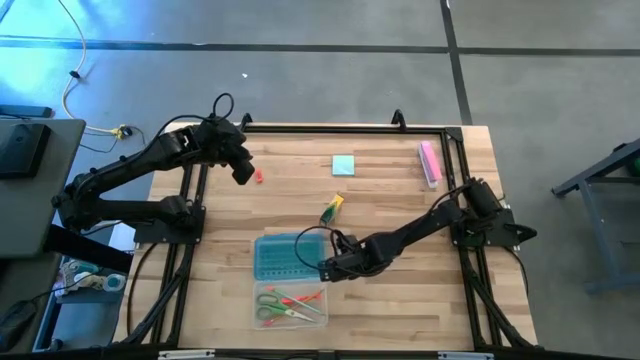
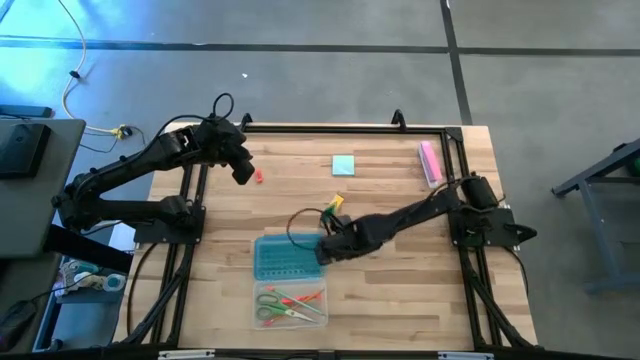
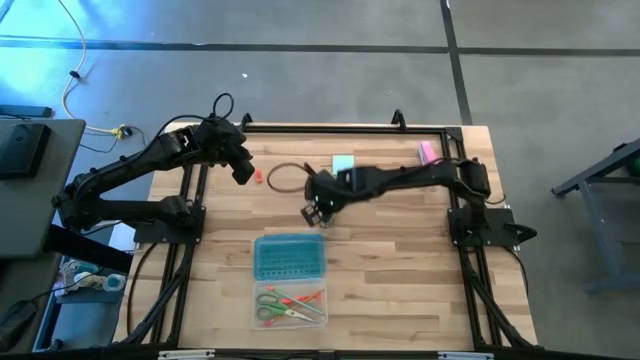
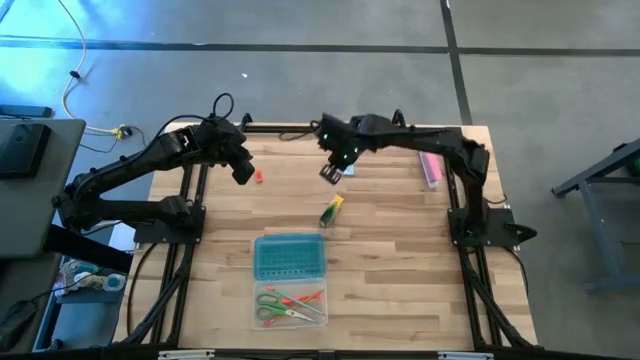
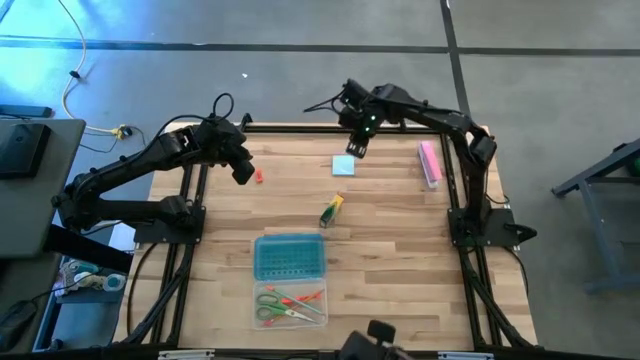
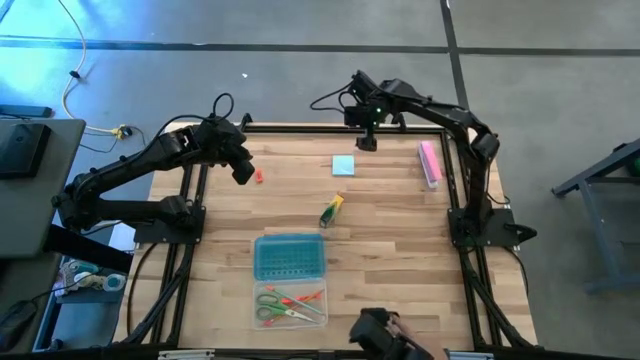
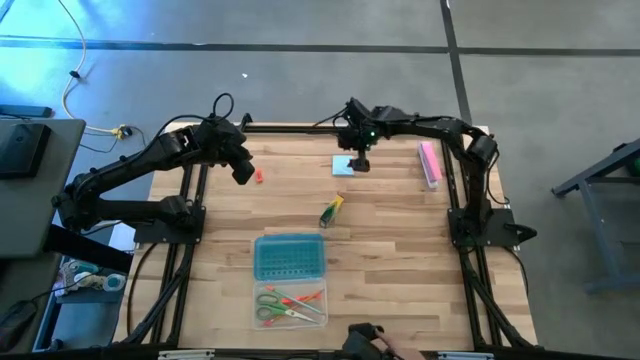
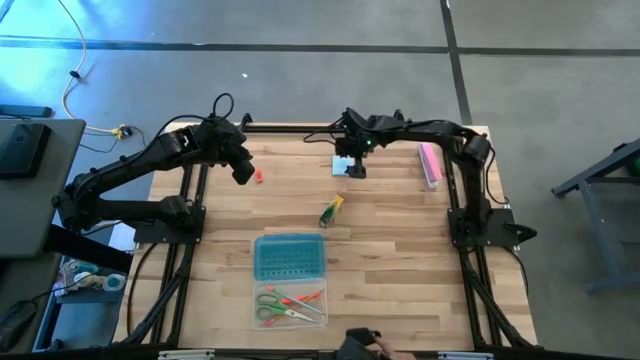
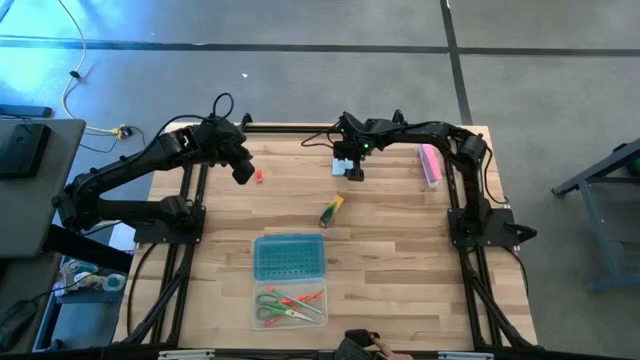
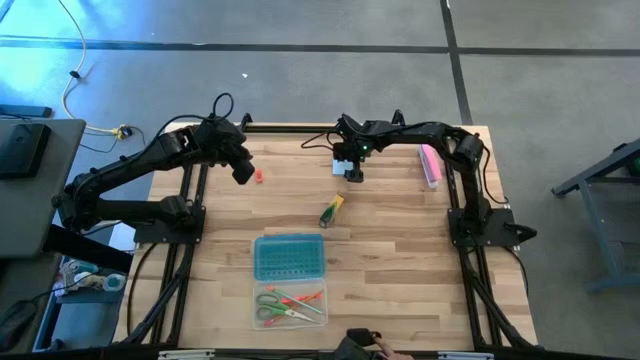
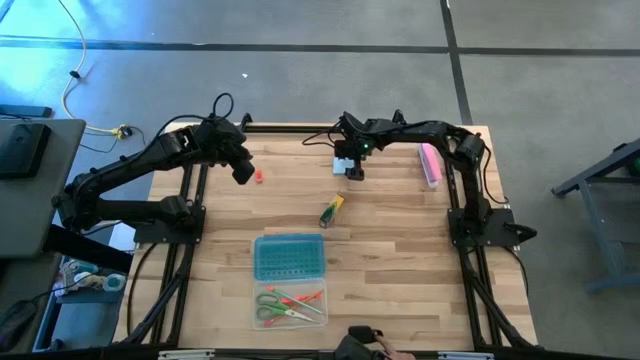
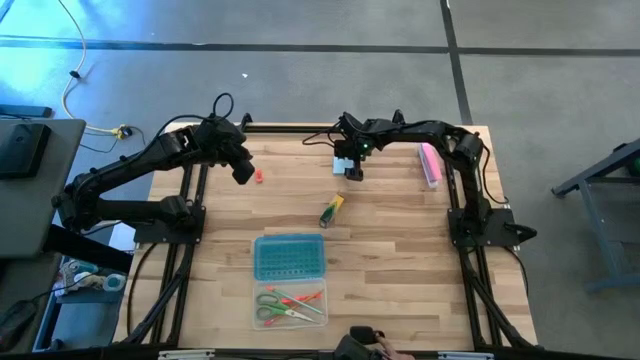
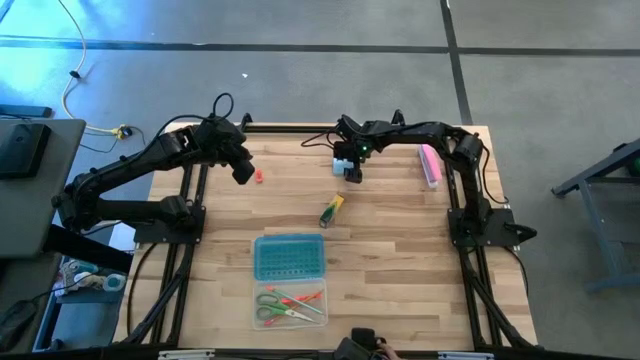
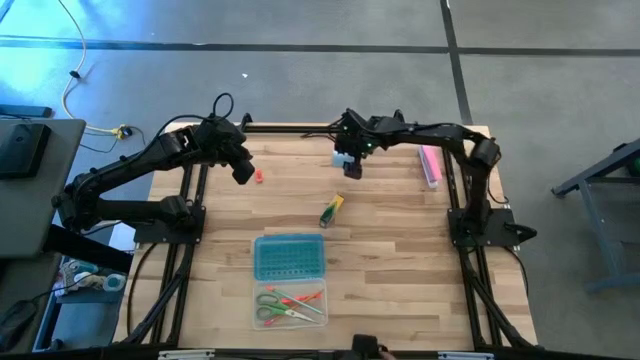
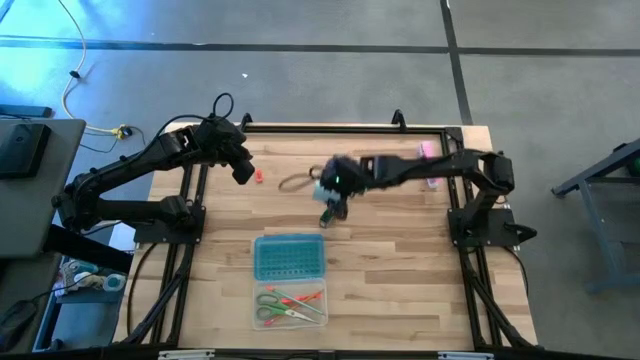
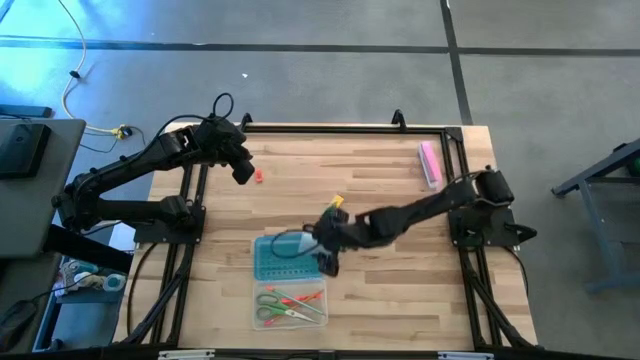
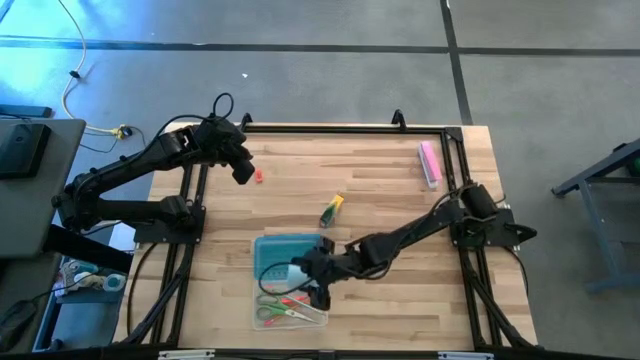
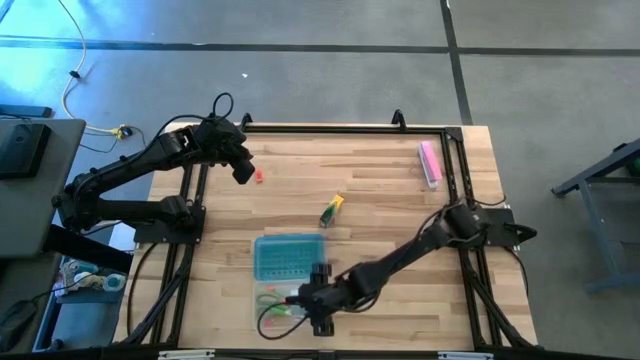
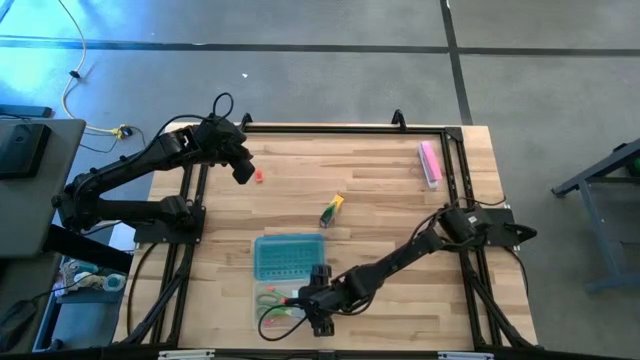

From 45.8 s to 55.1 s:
Task: Pack school essentials
Put the blue sticky notes into the supply box

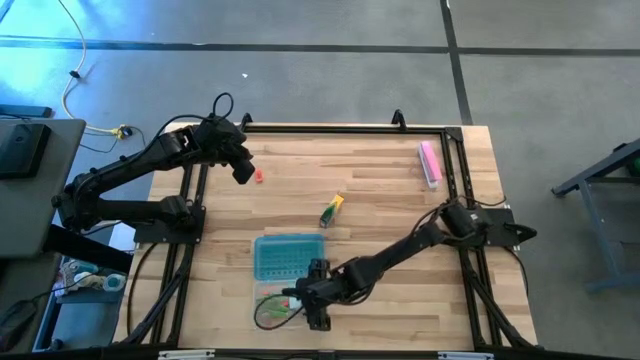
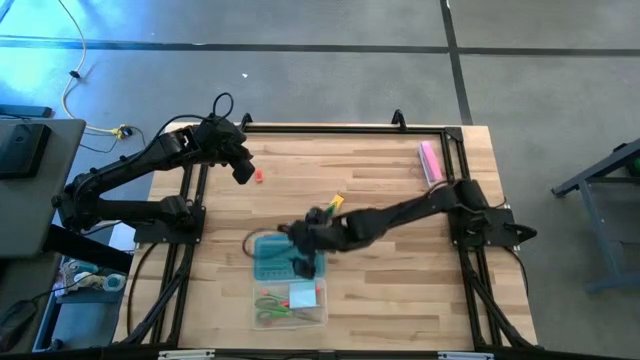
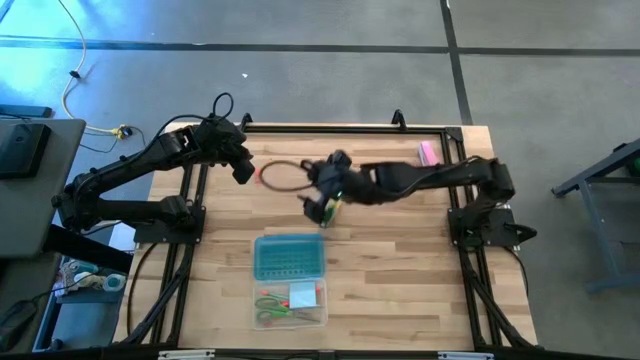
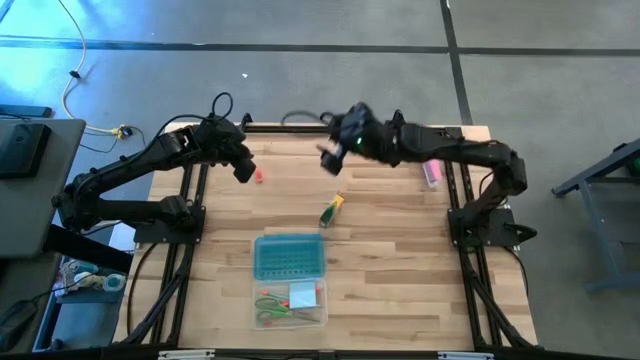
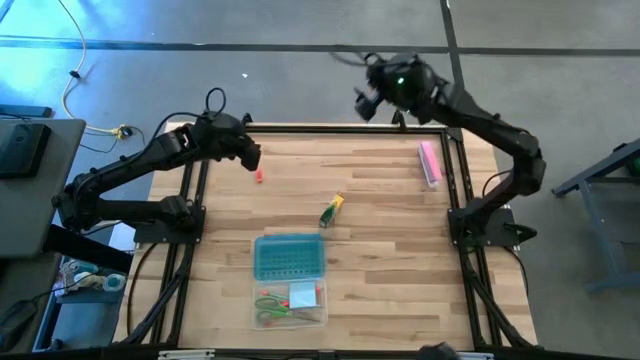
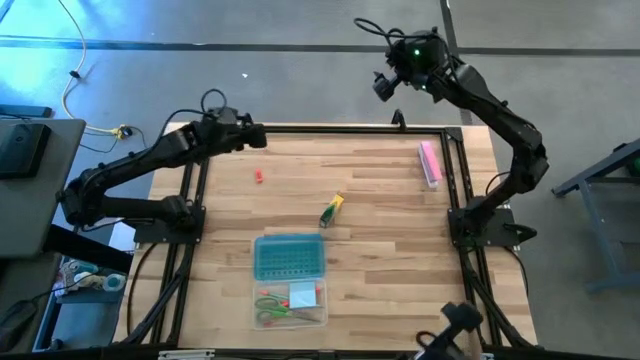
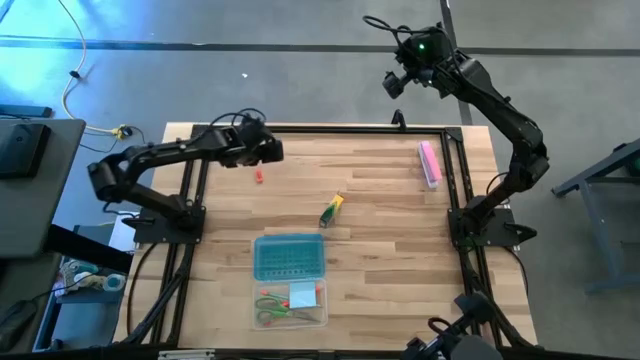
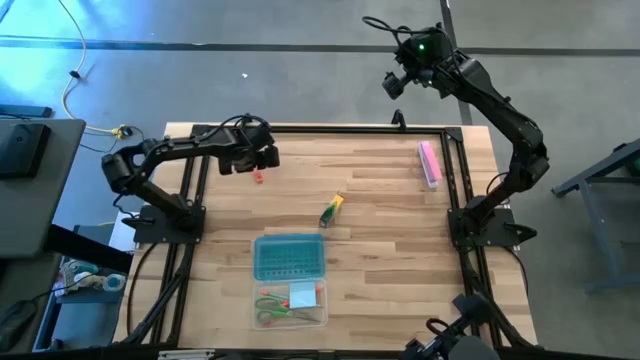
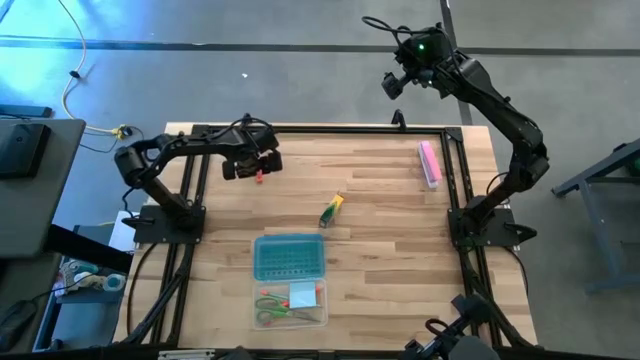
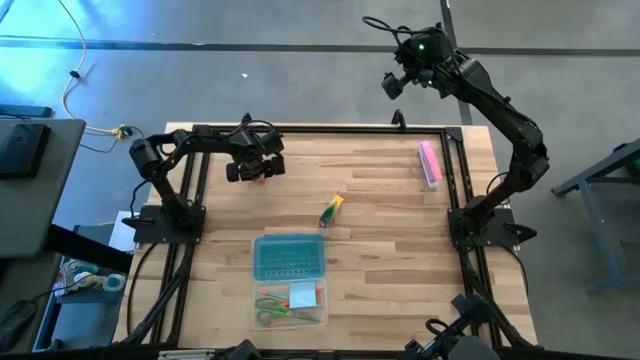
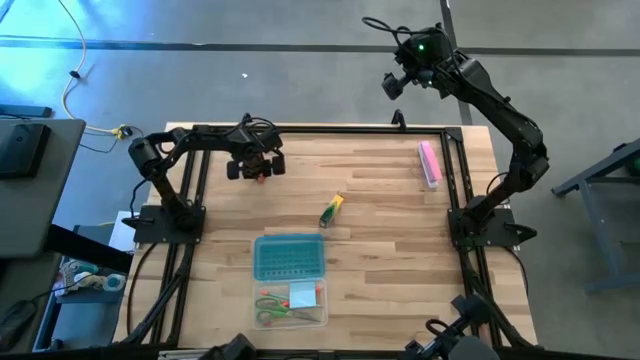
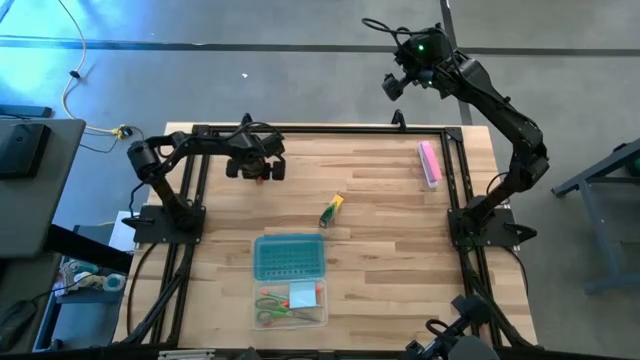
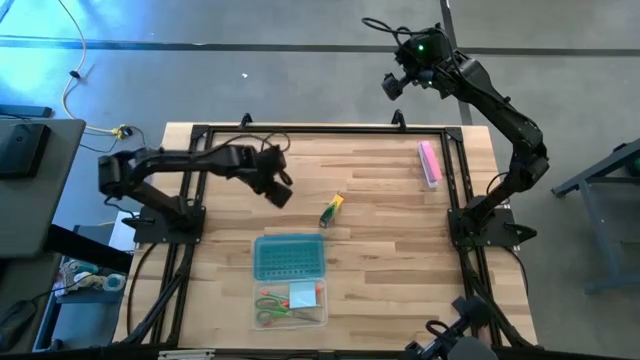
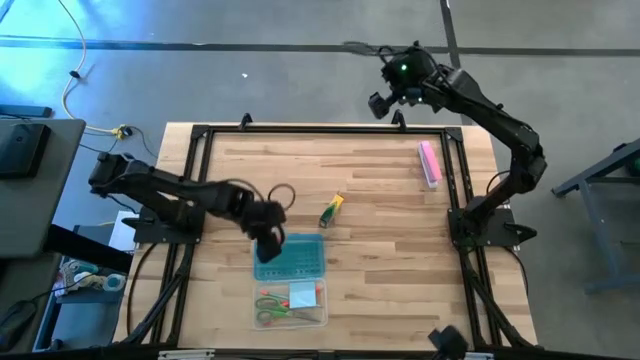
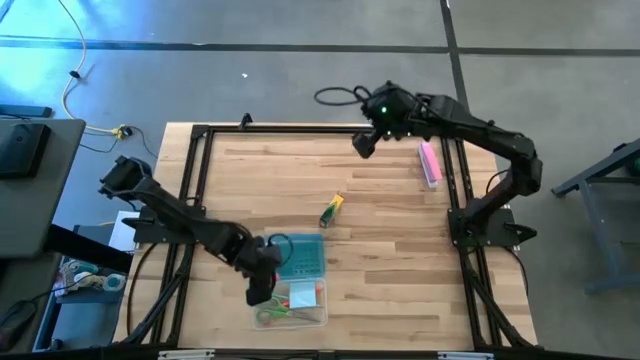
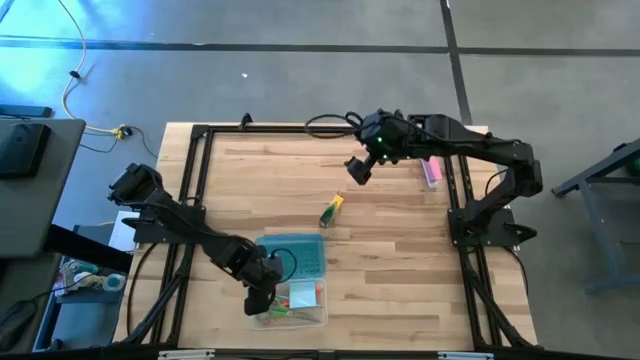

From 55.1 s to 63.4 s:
Put the orange eraser into the supply box

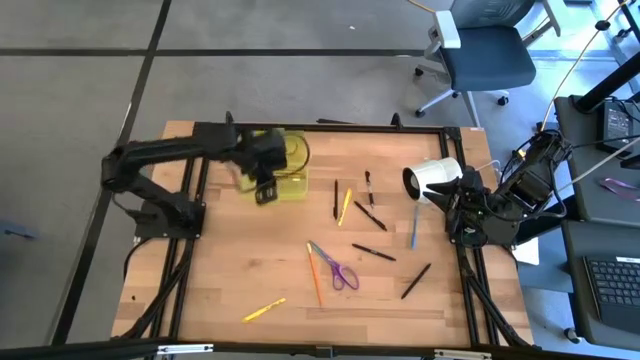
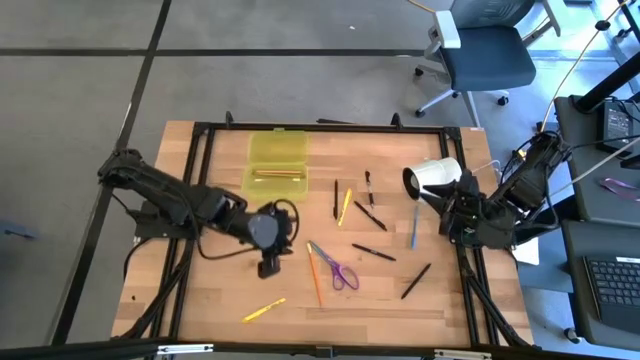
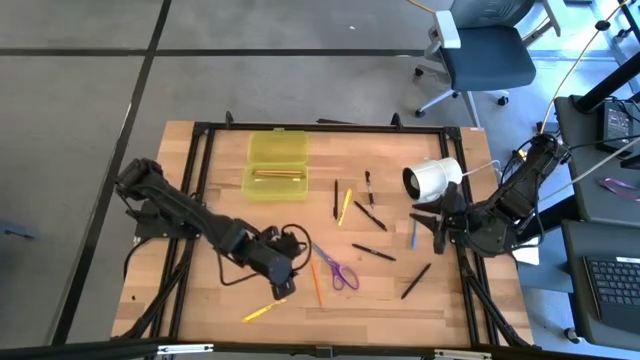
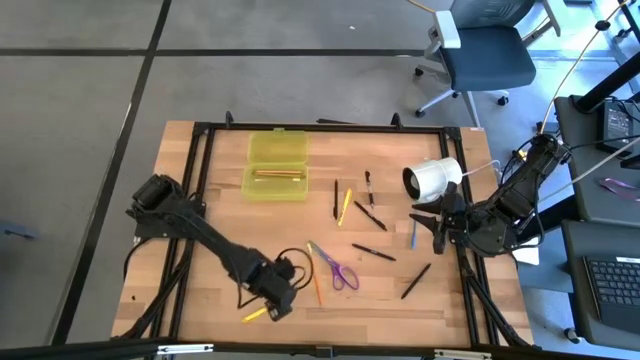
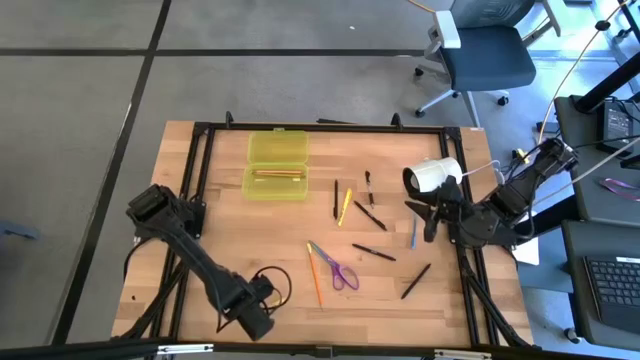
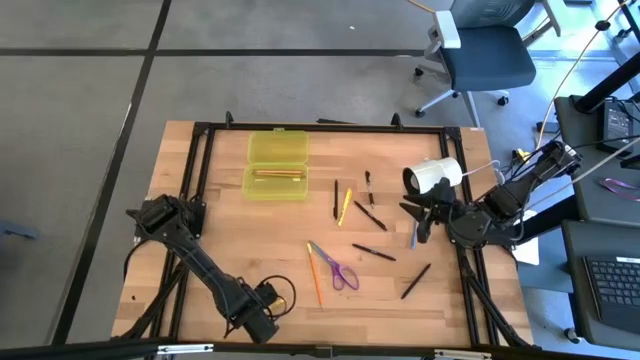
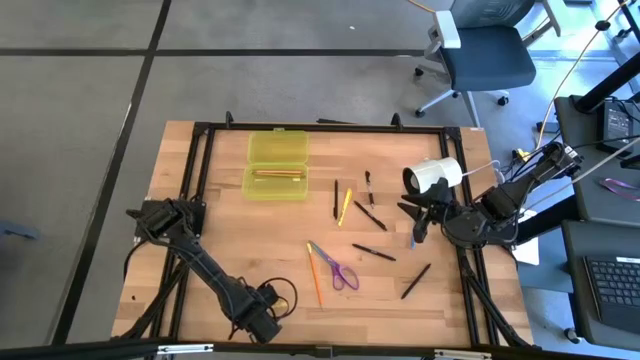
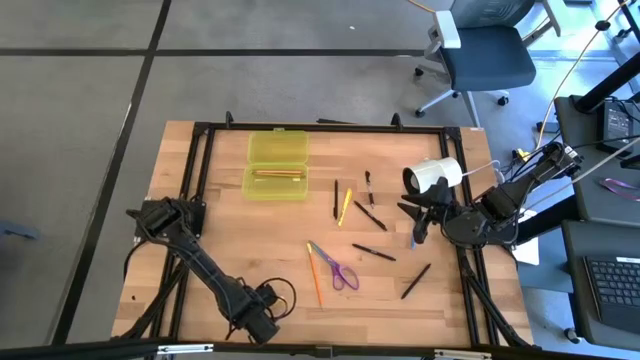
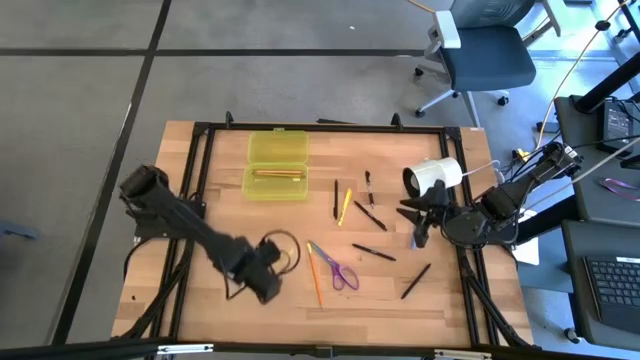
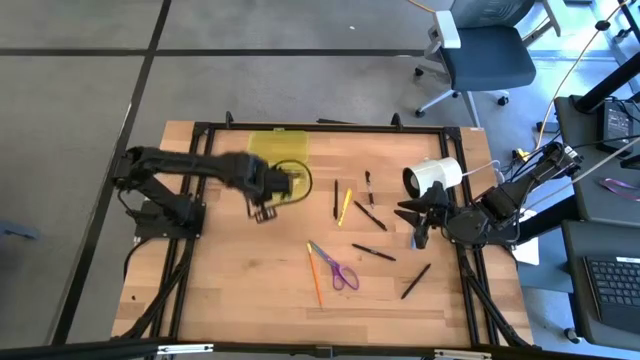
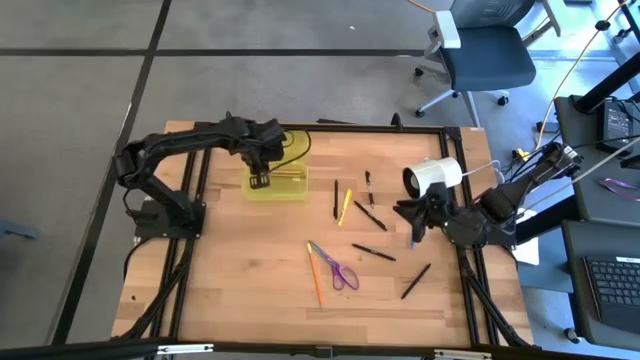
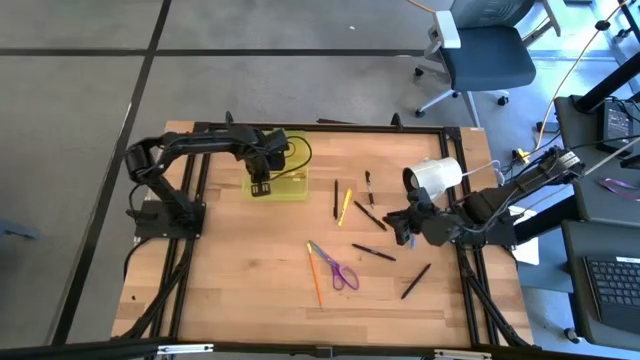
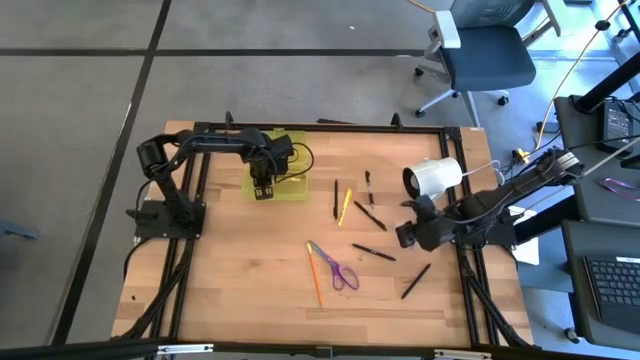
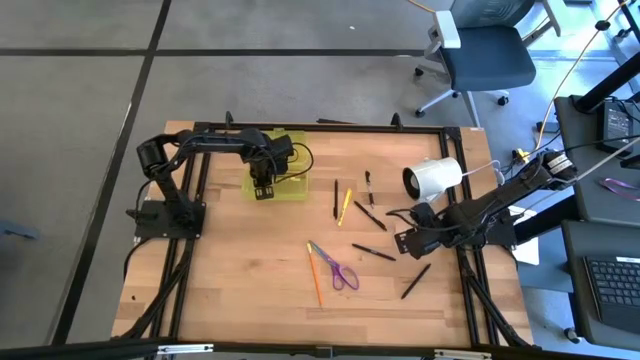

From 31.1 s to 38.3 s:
Task: Pick & place school supplies into a supply box
Put the left yellow pen into the yellow supply box
